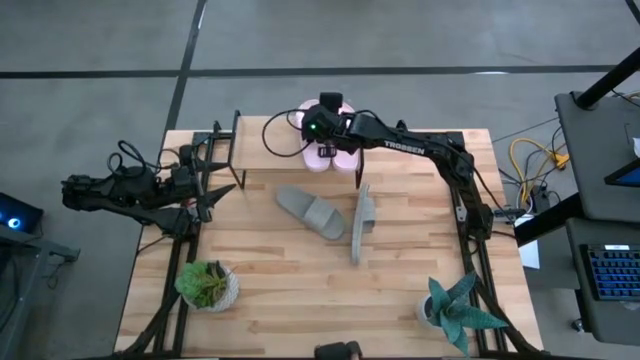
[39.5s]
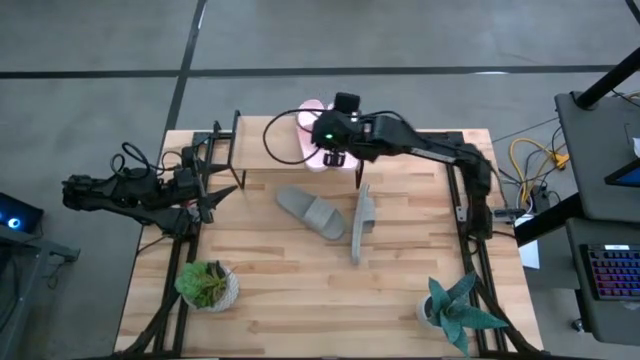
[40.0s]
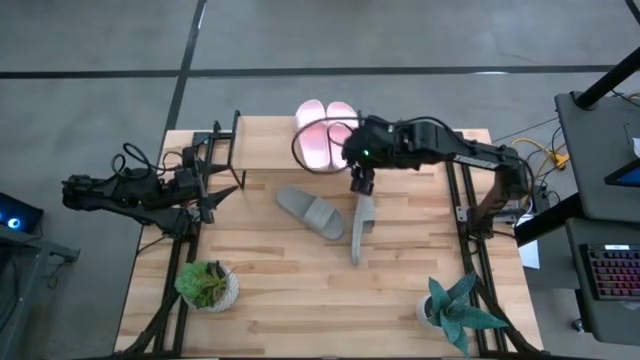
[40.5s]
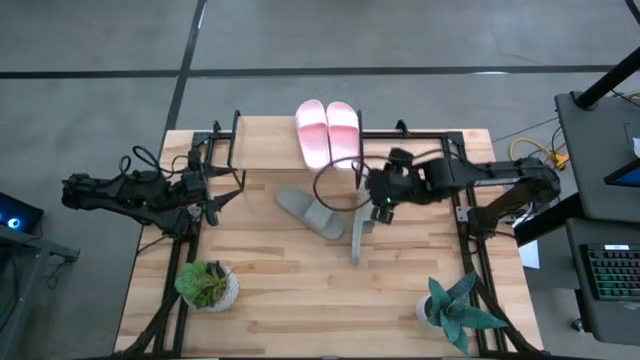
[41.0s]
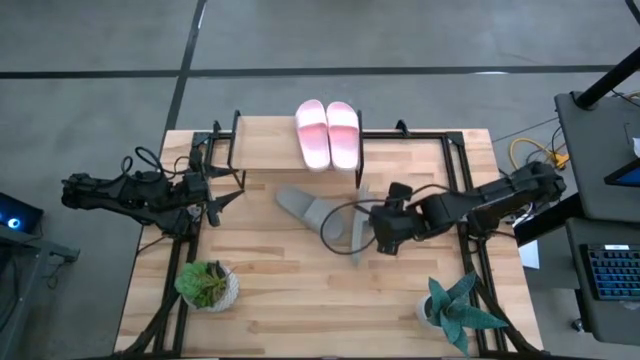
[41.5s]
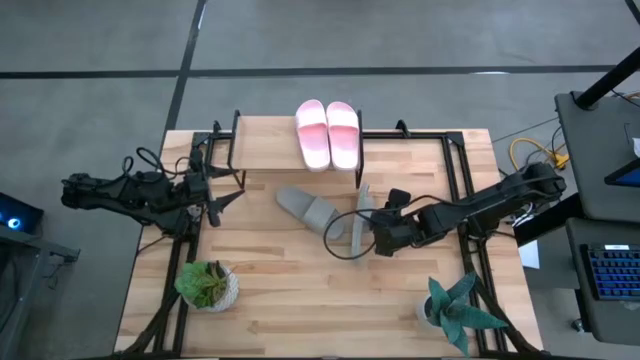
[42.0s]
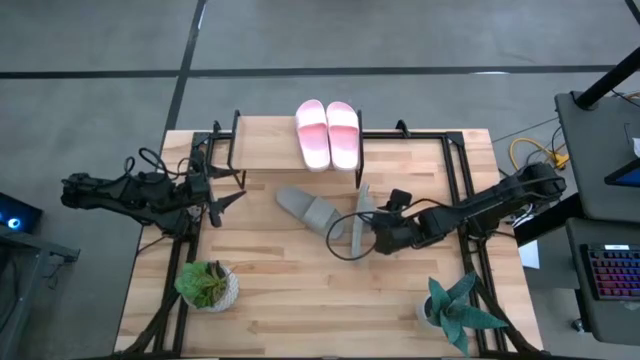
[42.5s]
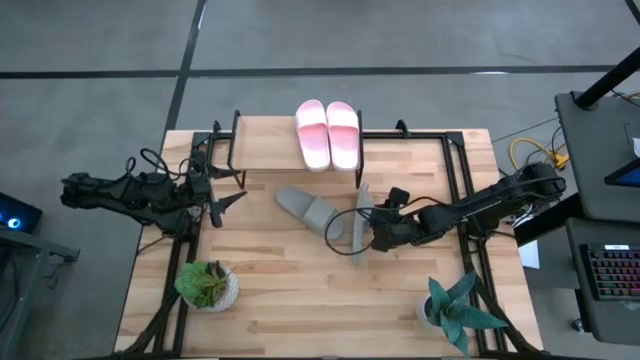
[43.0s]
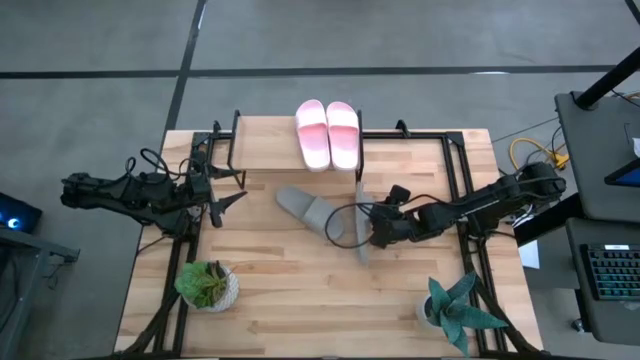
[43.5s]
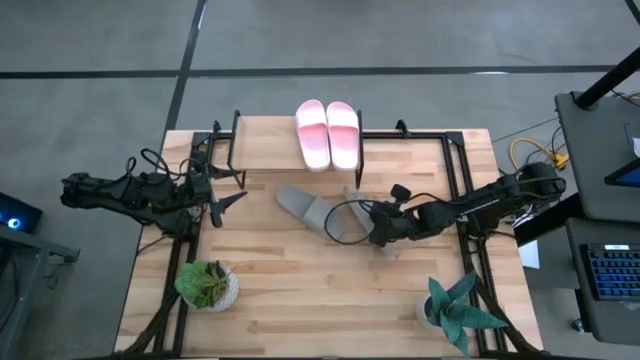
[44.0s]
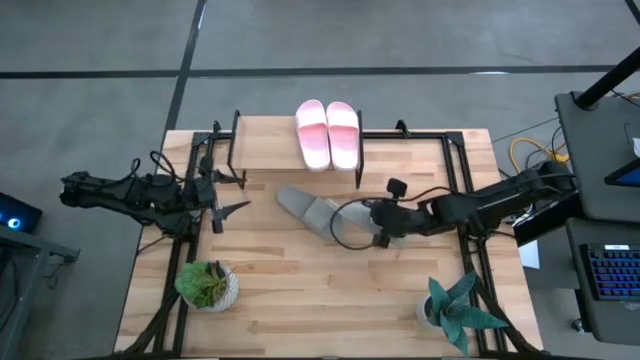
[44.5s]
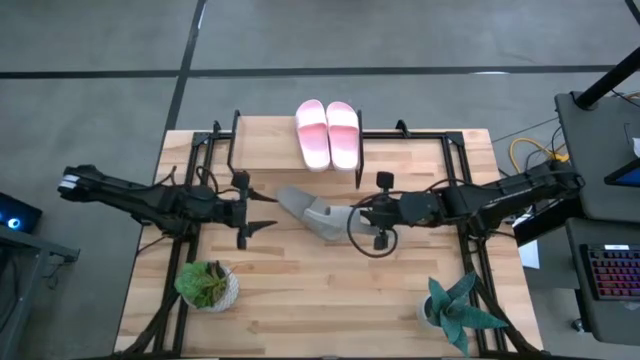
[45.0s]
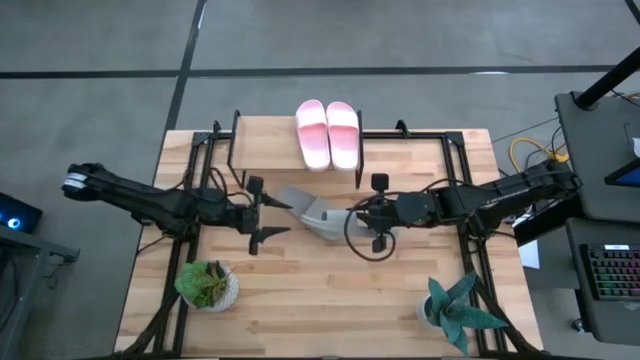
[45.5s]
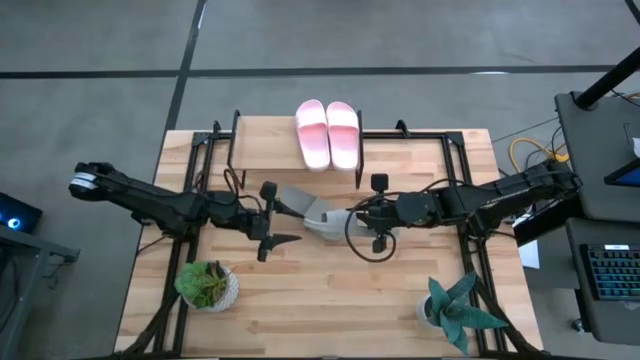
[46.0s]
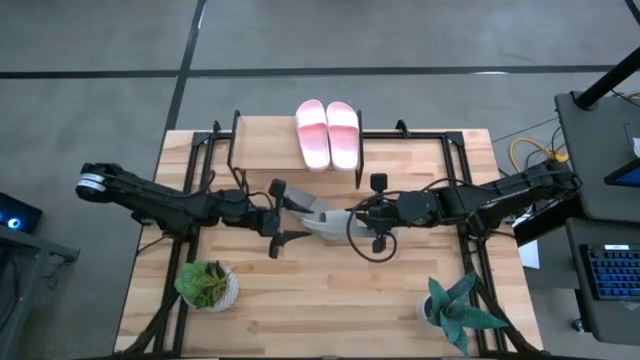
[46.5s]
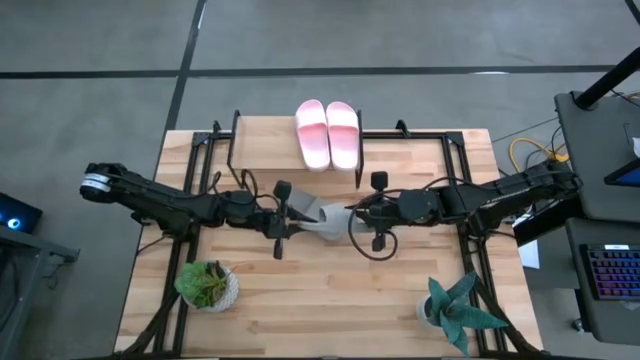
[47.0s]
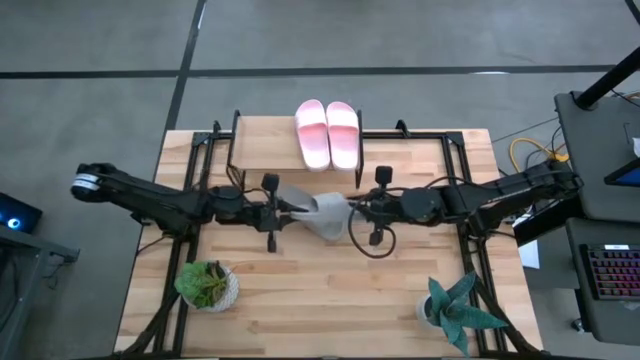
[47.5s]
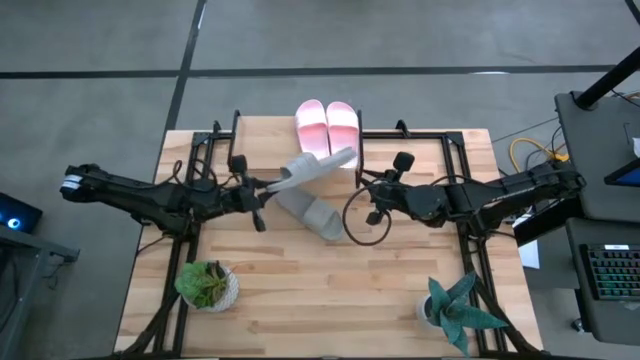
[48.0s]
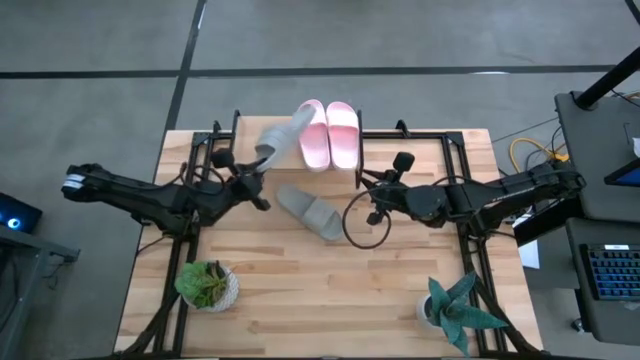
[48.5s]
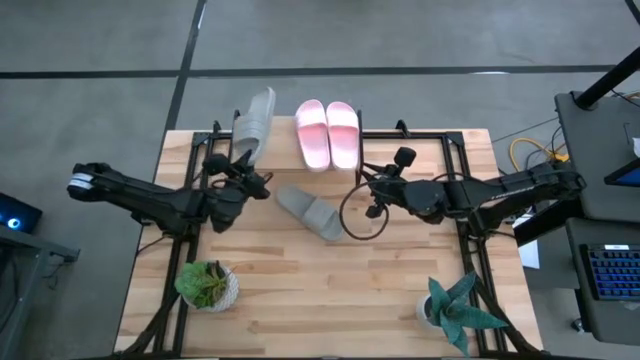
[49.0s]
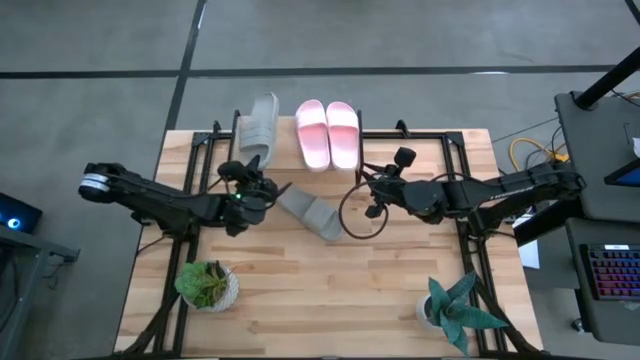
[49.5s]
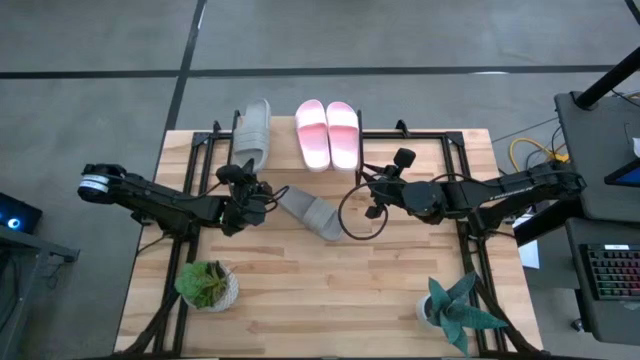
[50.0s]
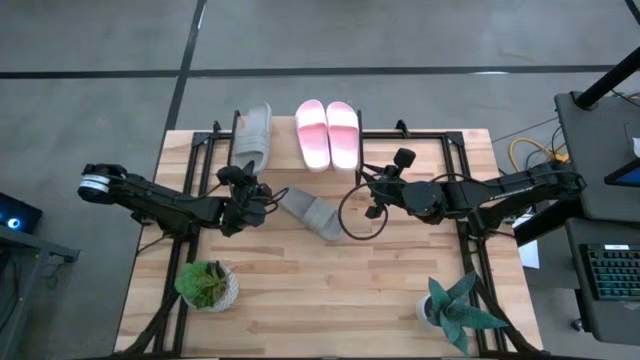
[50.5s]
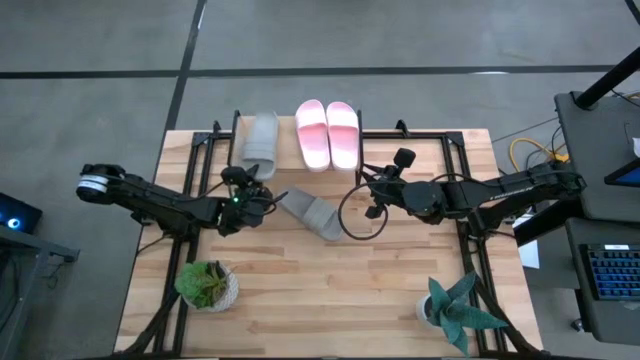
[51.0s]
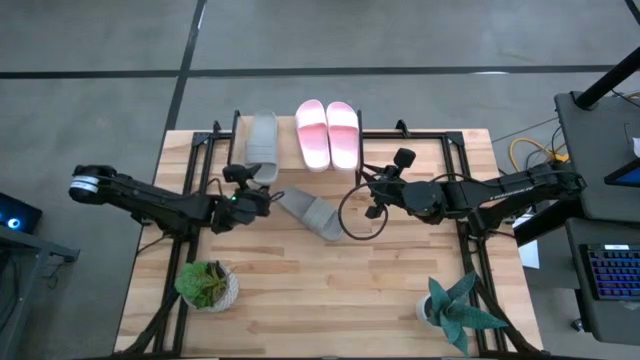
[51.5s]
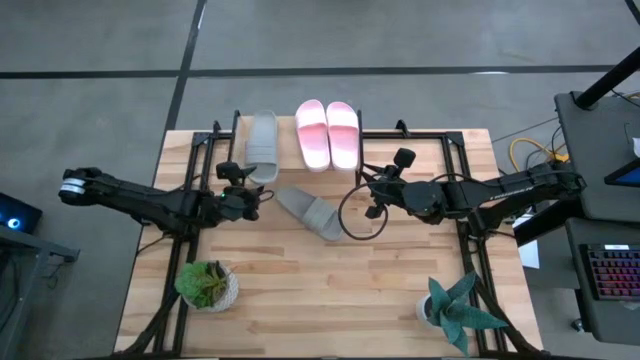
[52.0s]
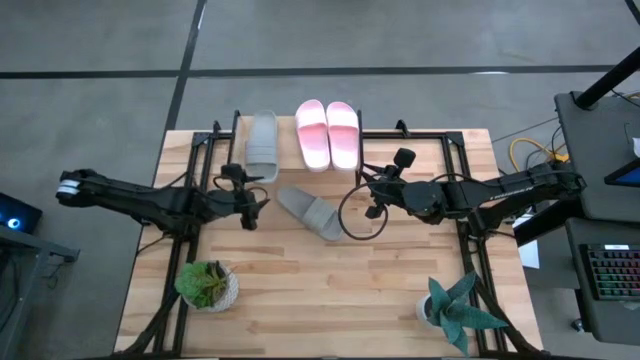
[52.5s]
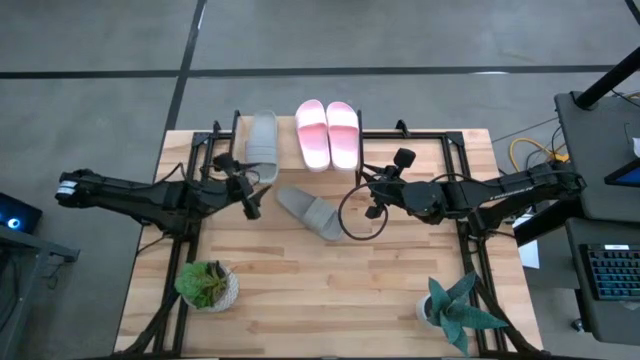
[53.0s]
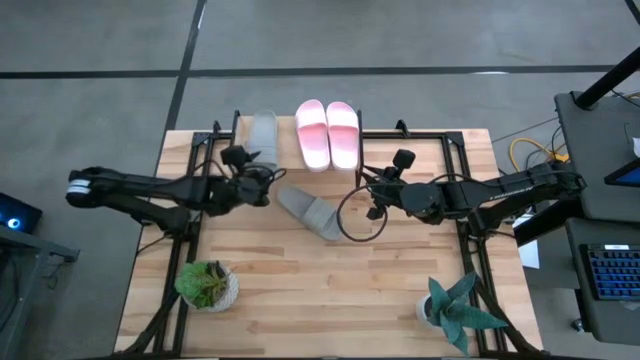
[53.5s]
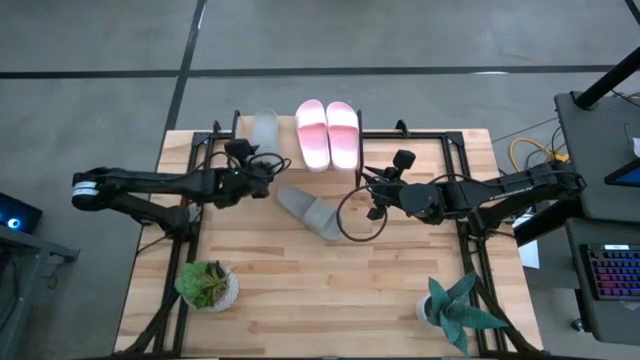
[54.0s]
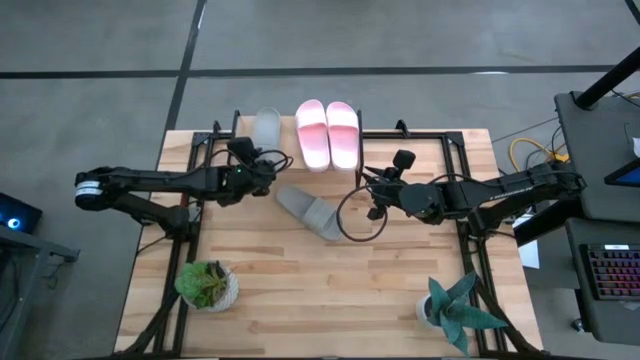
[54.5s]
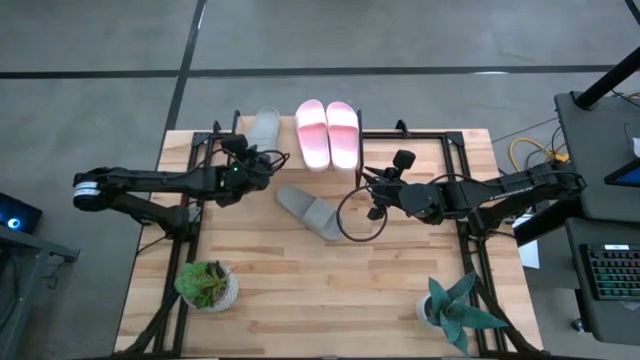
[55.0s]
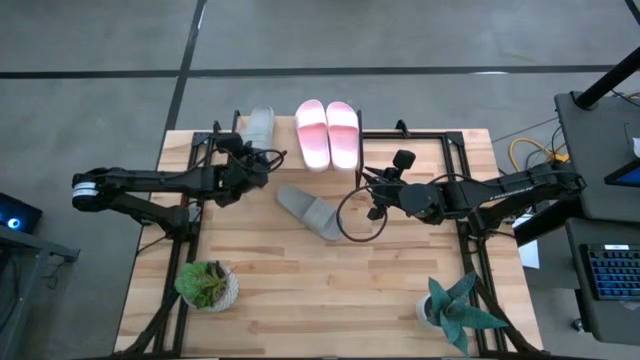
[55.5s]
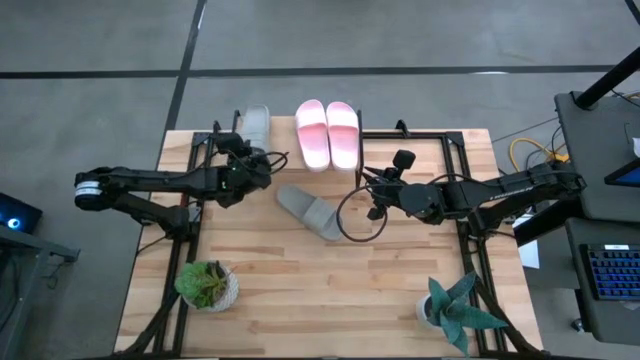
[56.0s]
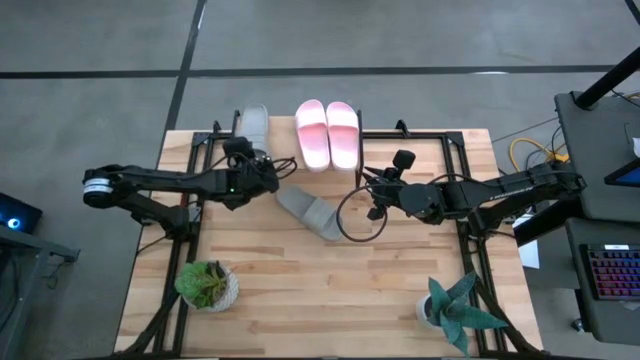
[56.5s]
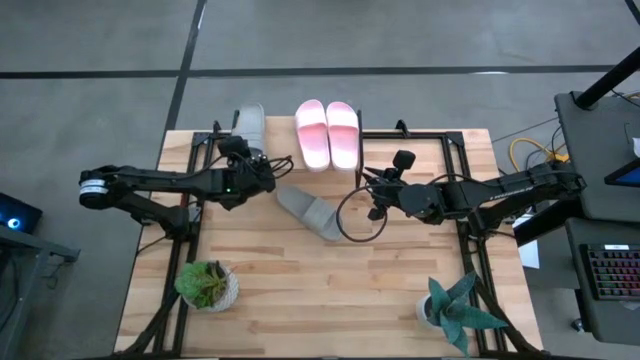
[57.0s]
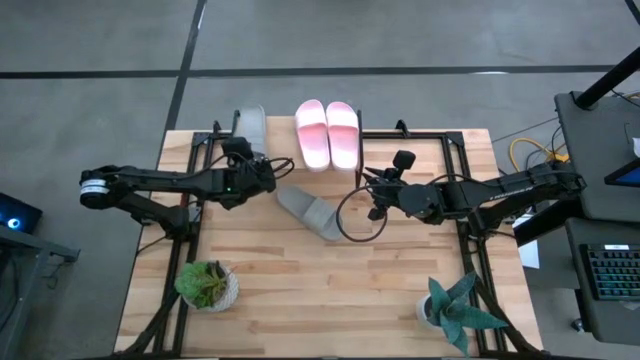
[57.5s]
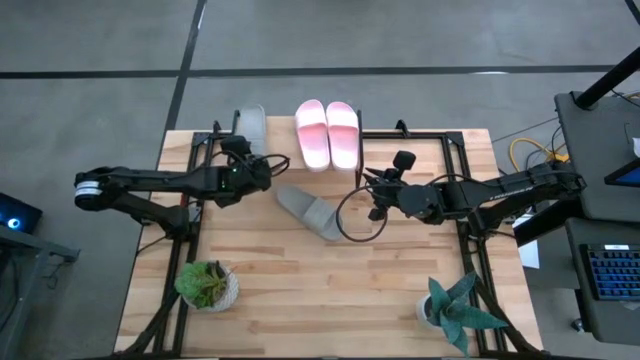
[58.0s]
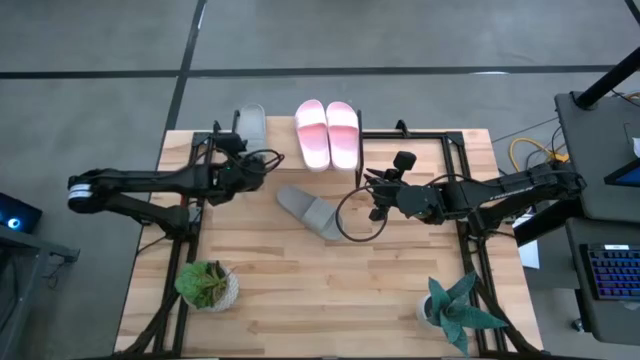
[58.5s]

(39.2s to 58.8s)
Task: Pick and place slides into the shelf
Put the right gray slipper on the shelf

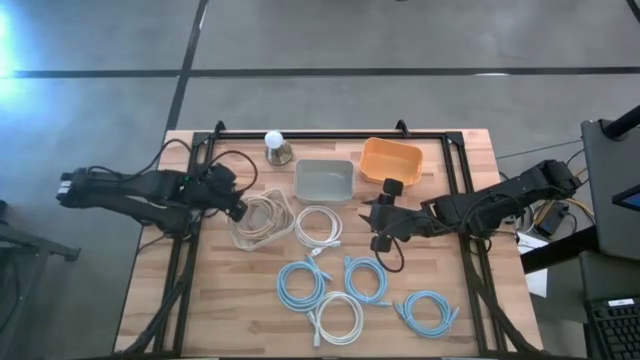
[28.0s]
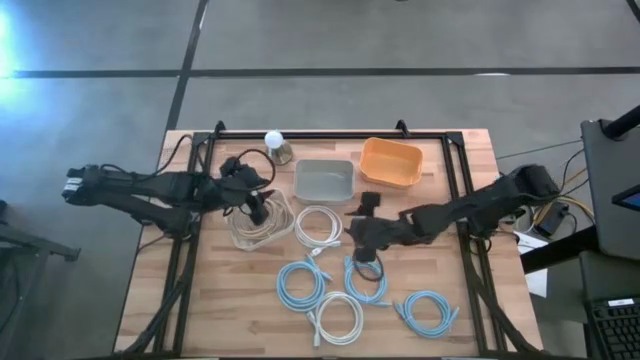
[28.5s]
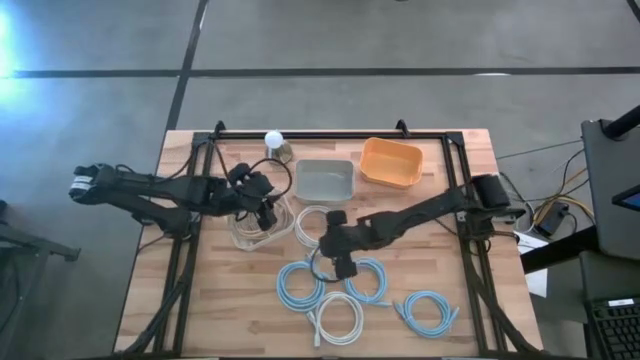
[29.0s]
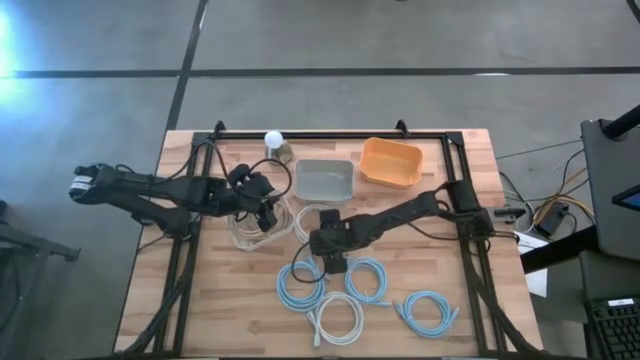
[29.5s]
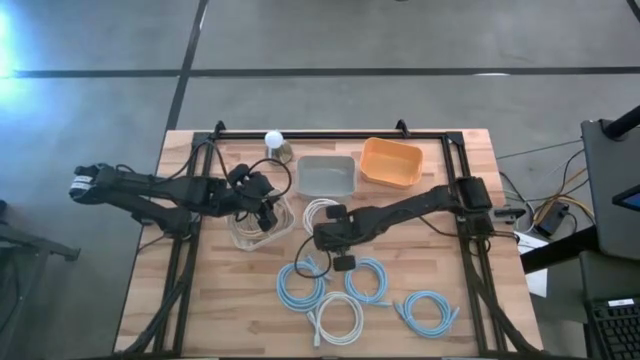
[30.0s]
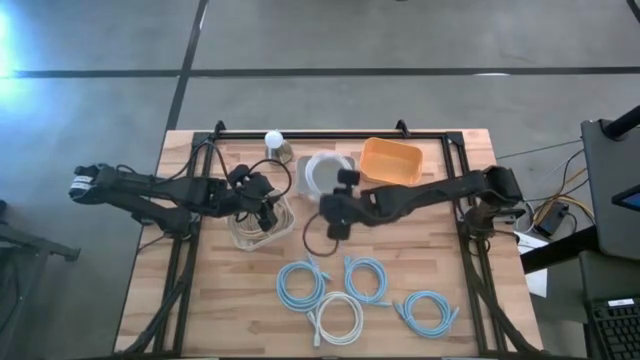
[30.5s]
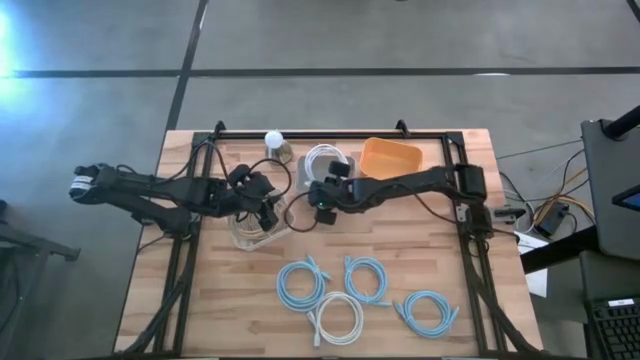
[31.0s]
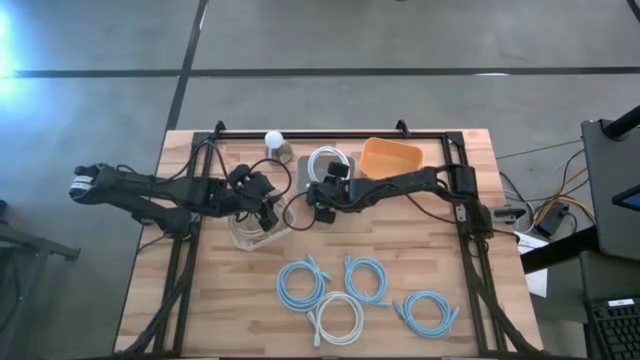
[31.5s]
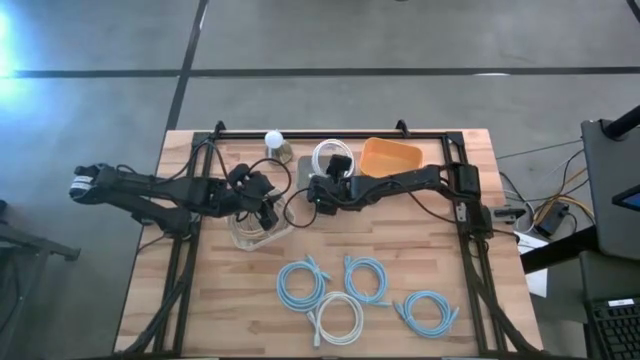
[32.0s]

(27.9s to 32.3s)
Task: Sort HDMI cables
Put the top white HDMI cable into the gray bin
